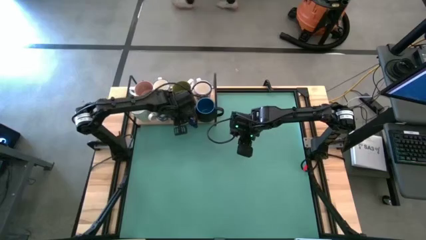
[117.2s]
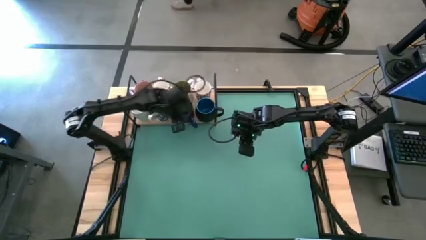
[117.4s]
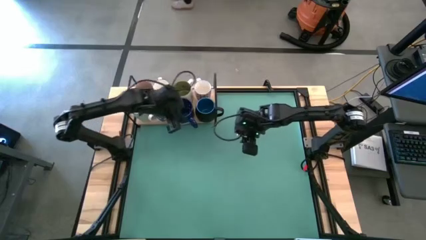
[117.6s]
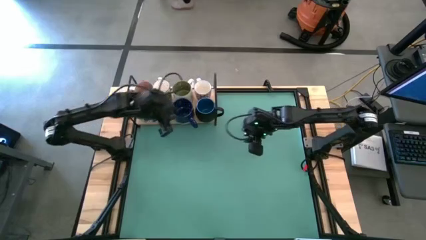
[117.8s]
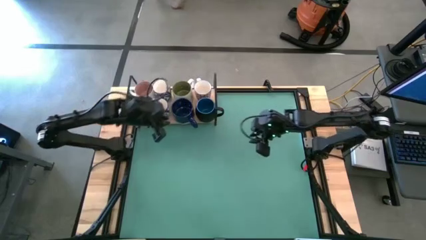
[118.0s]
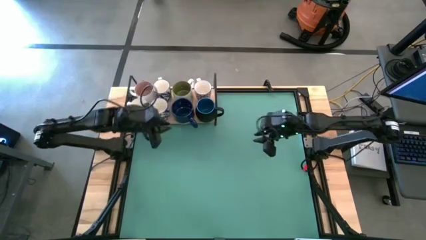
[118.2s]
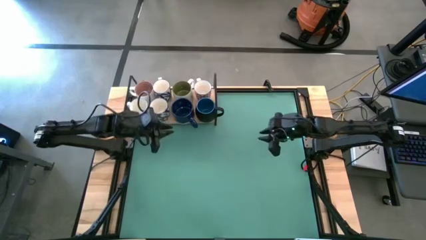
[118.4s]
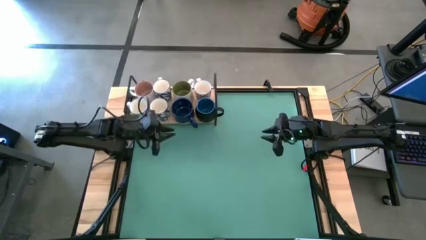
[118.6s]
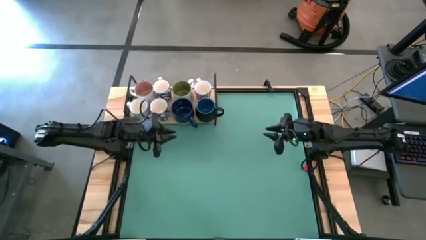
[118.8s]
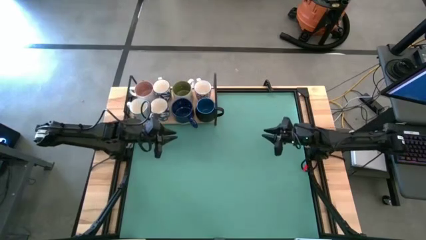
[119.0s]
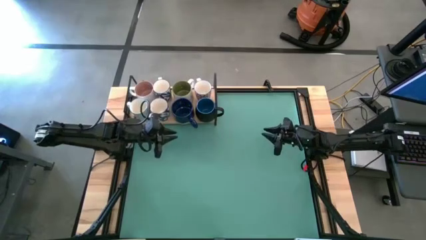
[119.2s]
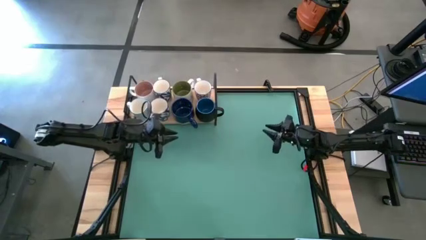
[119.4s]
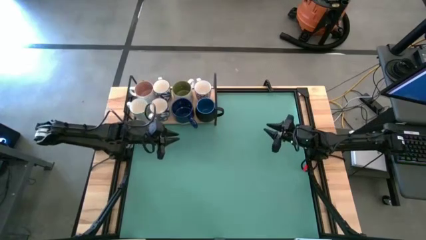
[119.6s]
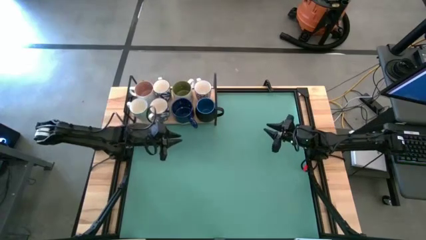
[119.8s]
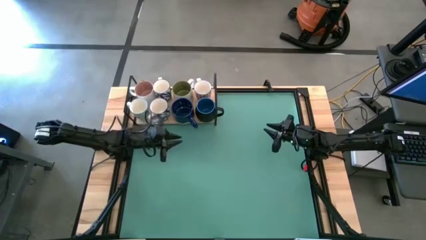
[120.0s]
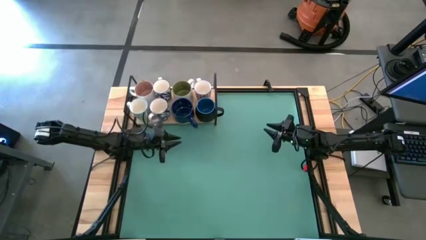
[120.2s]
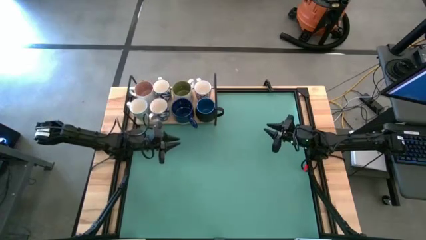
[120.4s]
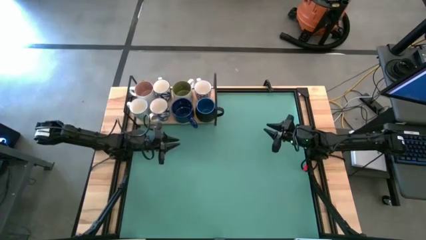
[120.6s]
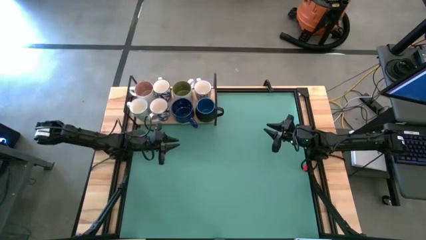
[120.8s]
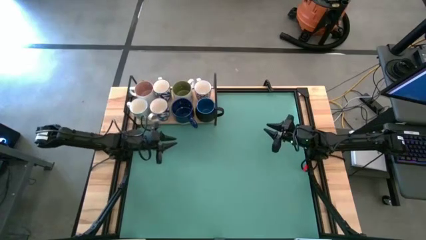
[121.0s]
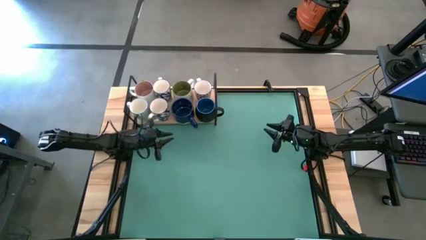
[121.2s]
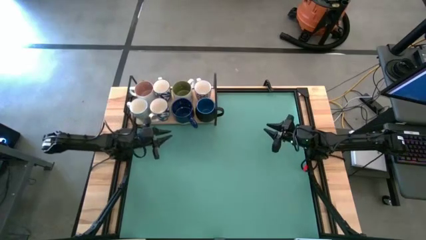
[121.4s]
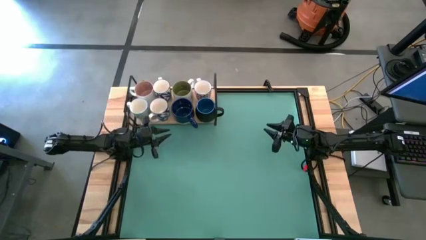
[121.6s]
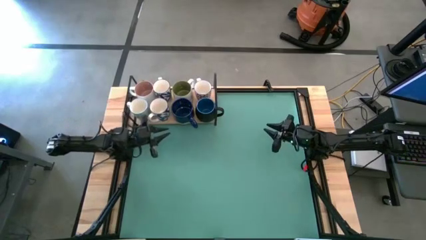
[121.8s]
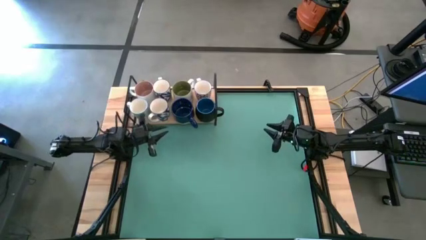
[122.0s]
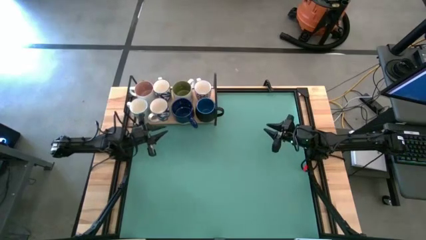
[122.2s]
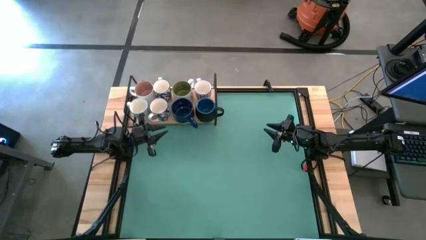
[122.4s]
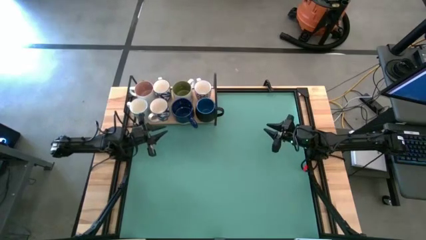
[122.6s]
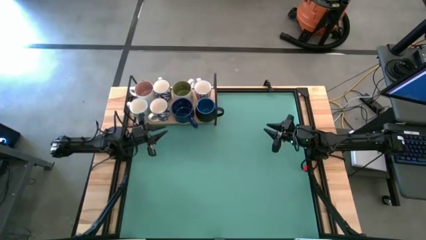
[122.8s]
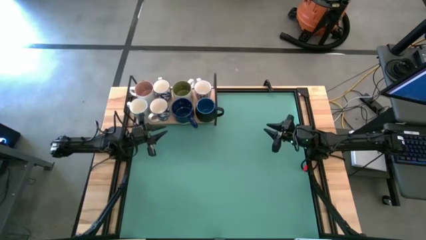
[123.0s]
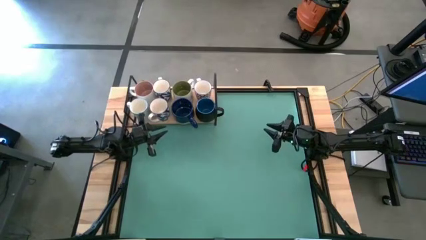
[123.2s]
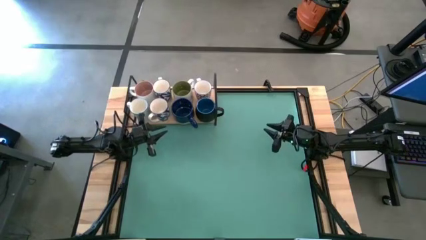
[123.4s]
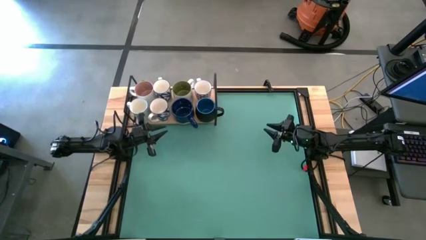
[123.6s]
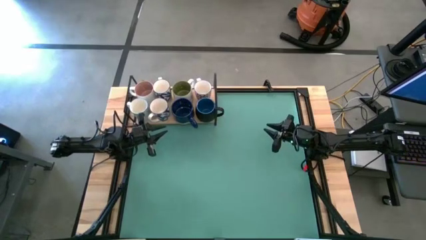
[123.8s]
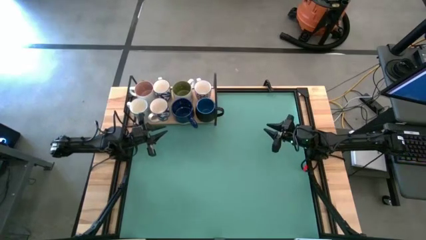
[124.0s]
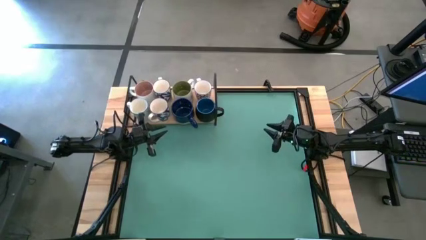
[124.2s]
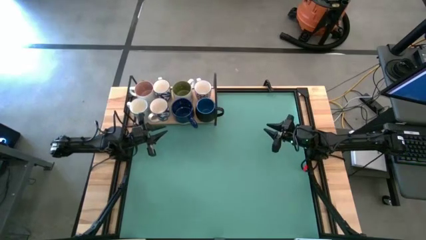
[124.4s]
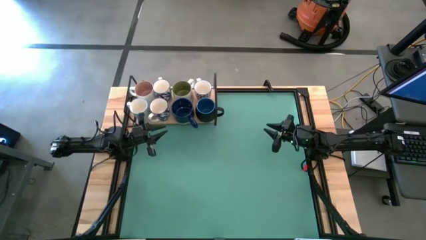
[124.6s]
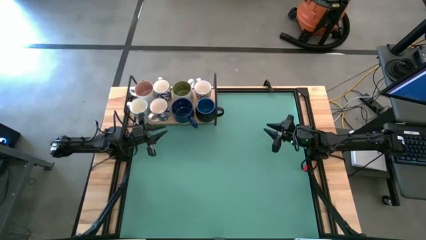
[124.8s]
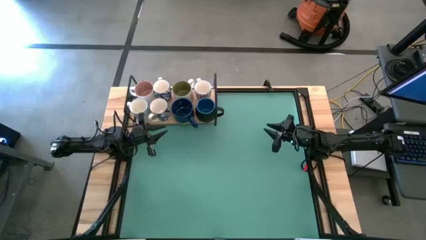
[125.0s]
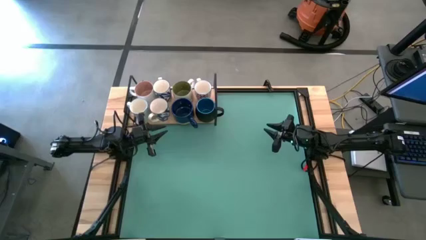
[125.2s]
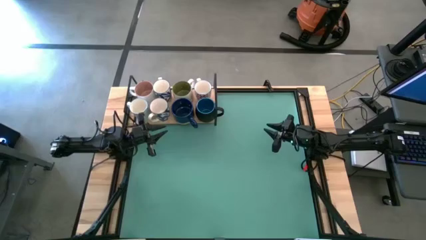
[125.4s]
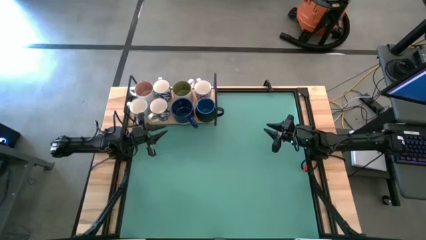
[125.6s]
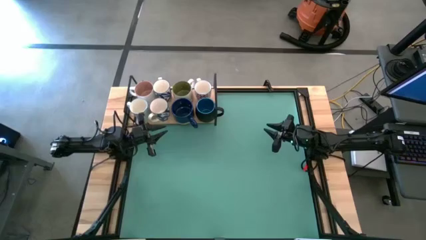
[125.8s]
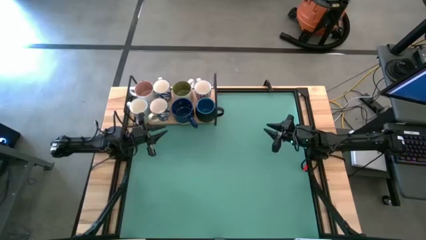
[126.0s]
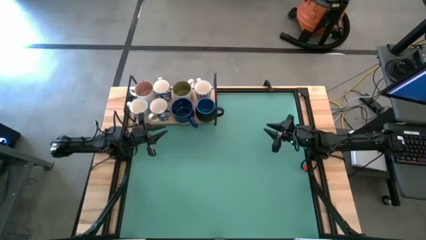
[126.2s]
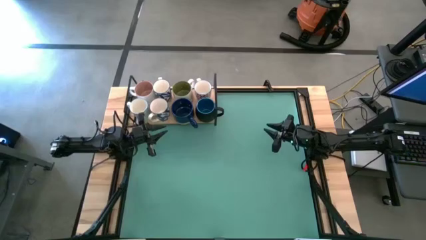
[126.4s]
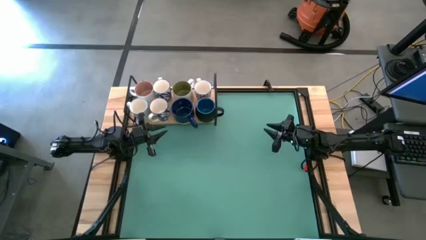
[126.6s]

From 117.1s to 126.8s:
Task: Place coffee mugs
Return to Home Position

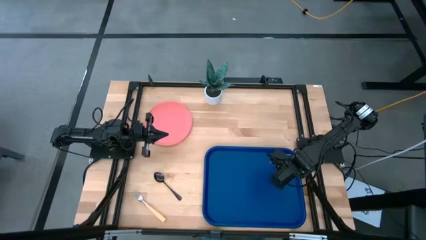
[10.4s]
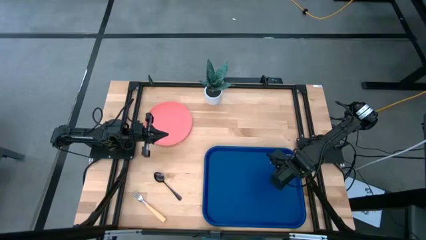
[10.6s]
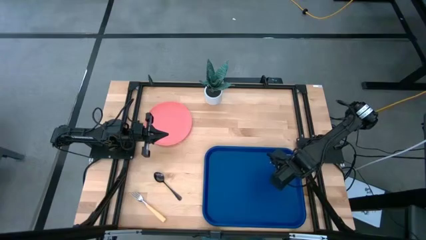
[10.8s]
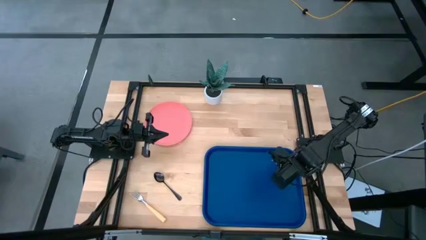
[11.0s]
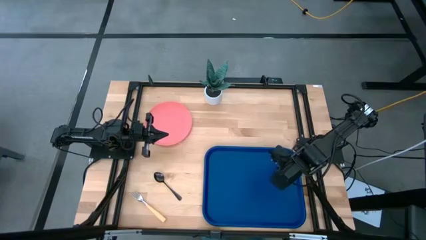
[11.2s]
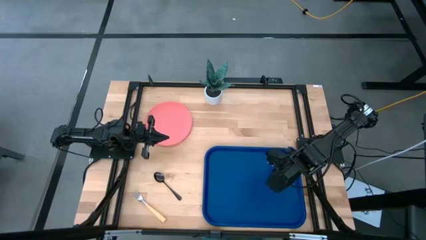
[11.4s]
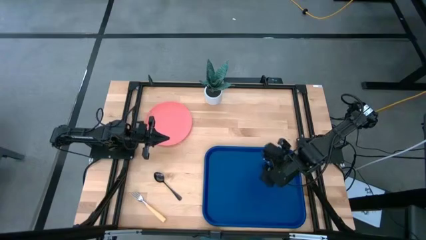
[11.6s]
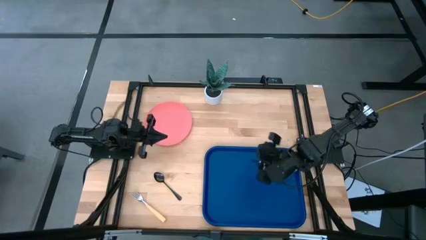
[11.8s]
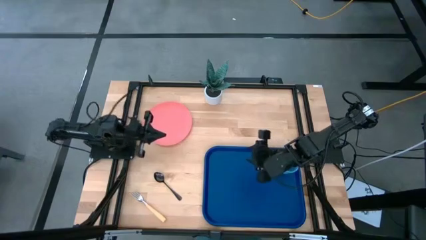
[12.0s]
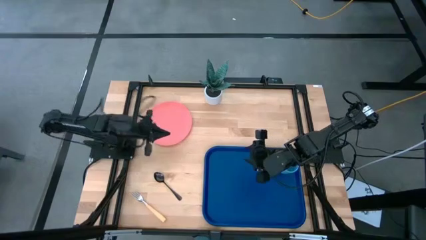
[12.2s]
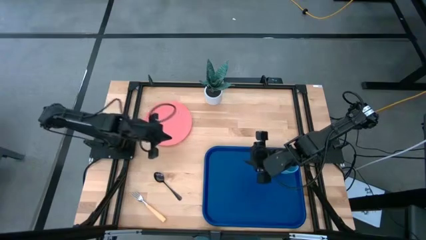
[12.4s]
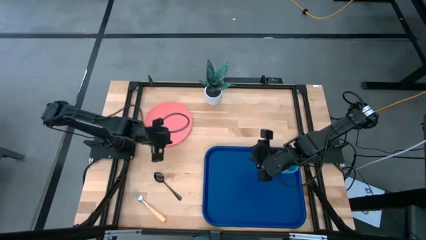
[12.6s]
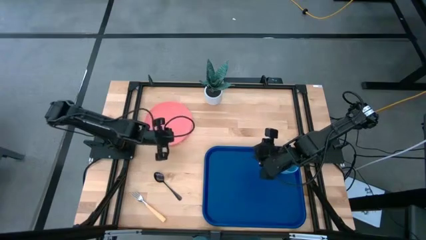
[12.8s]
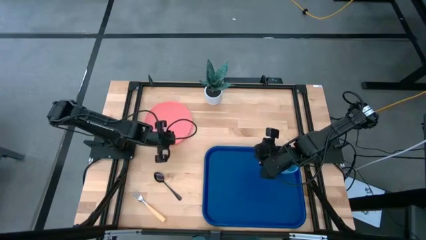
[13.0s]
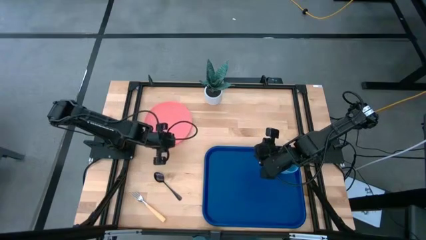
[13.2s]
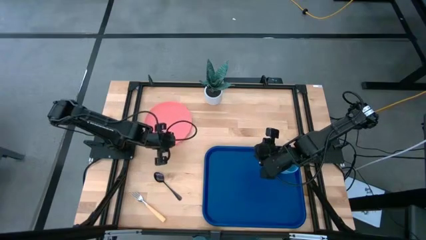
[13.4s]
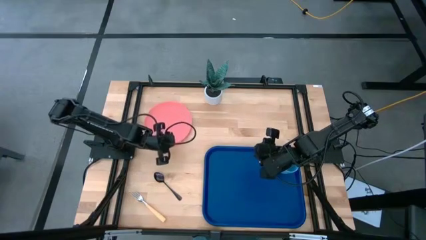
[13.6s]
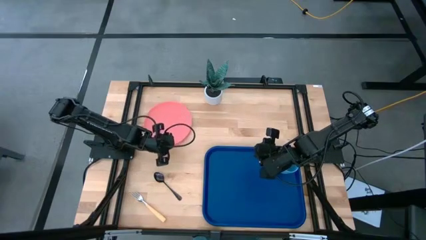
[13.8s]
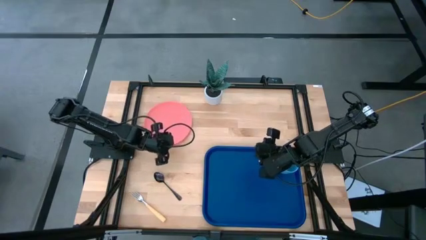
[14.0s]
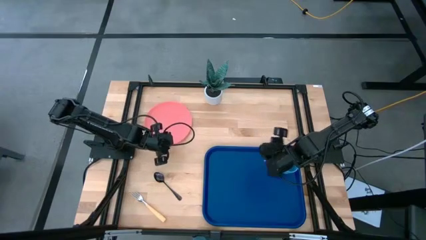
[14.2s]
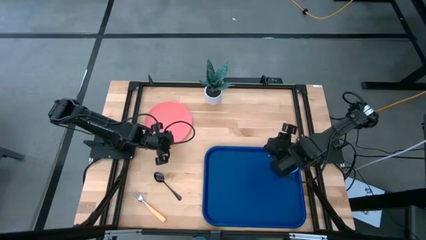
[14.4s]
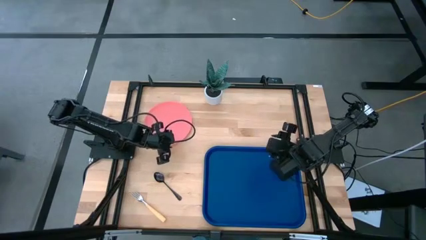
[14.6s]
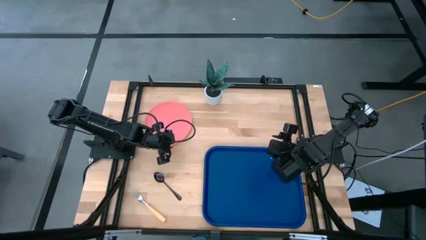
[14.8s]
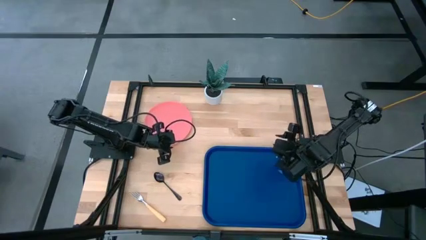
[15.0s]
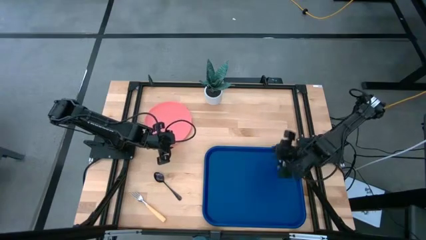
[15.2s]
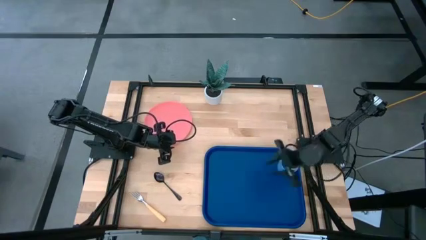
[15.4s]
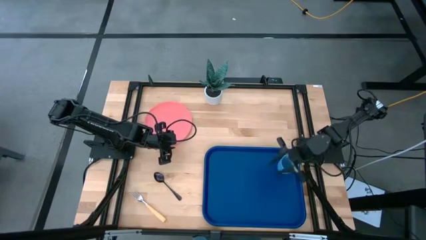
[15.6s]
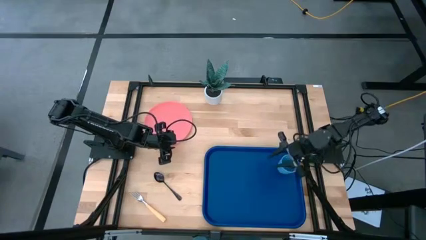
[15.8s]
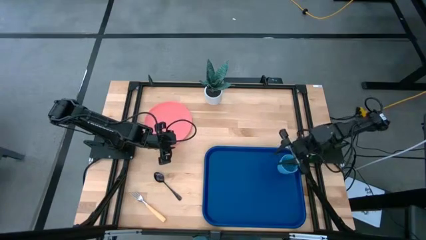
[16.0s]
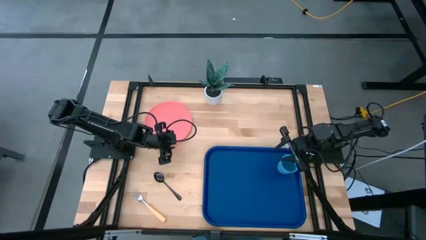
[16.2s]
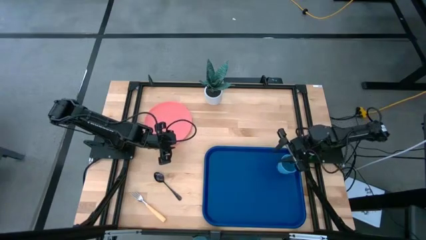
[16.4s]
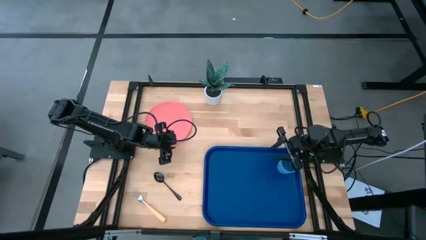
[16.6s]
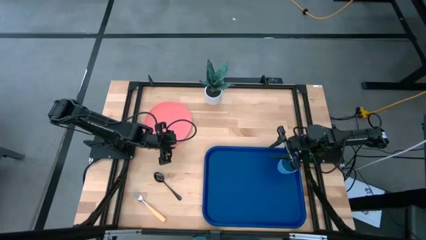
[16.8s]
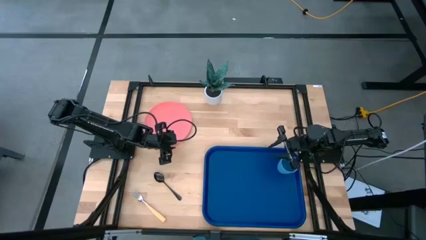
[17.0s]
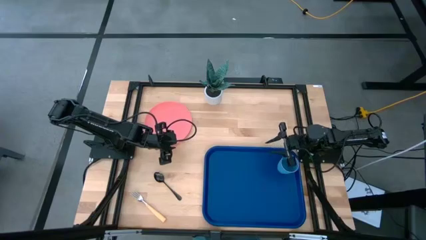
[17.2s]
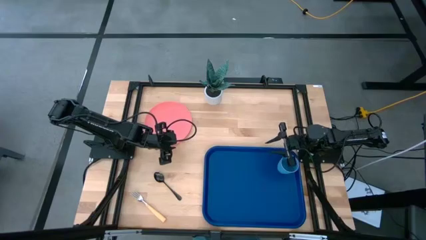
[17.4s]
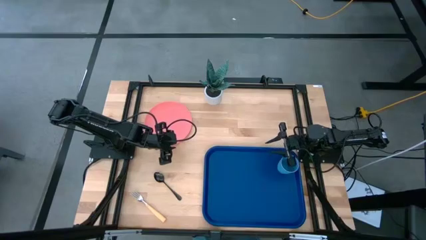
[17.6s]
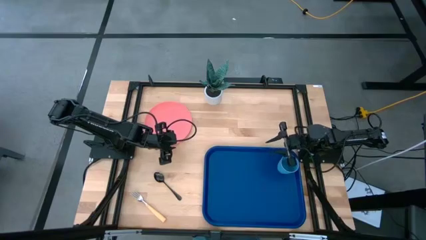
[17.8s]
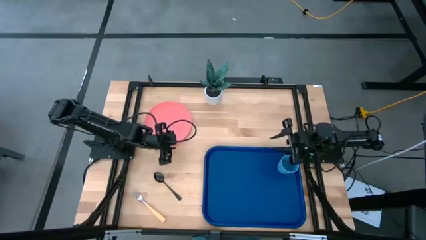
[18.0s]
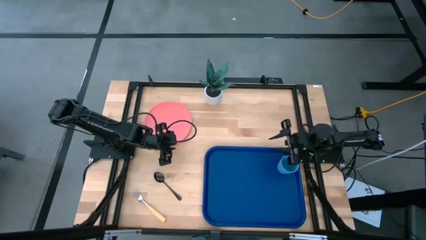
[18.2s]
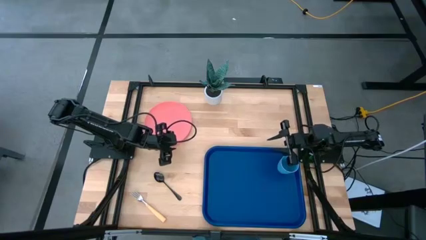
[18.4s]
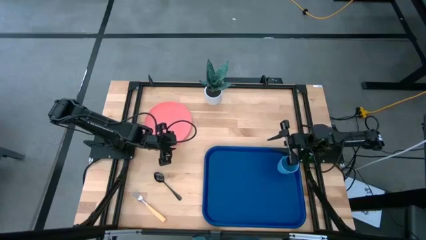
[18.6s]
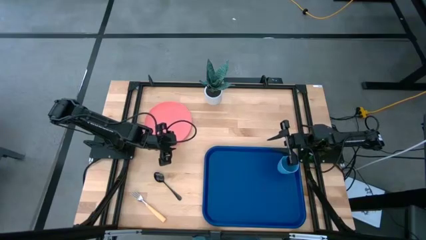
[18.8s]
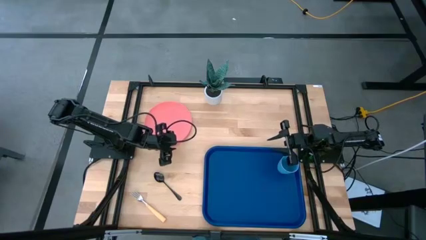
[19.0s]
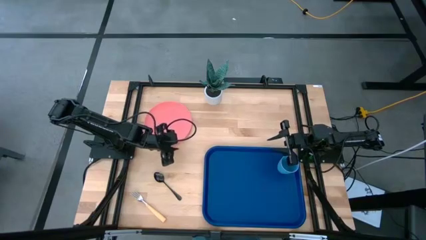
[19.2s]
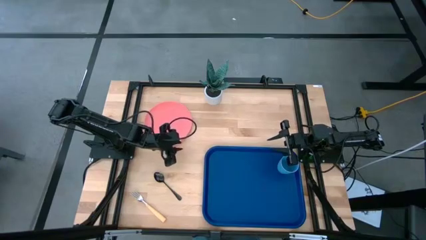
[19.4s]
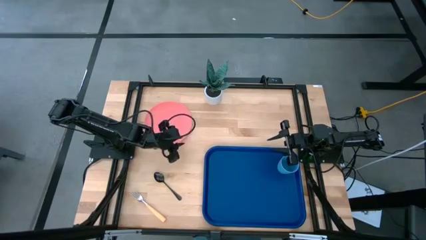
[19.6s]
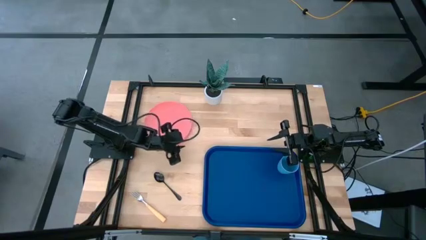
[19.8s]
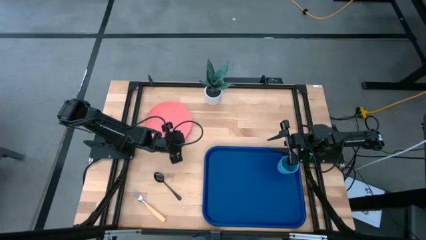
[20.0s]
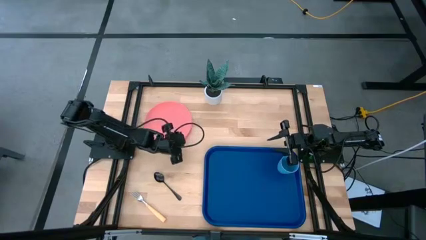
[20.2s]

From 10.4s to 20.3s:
Task: Pick and place plate/cup/fork/spoon on tray
Put the pink plate in the center of the blue tray
